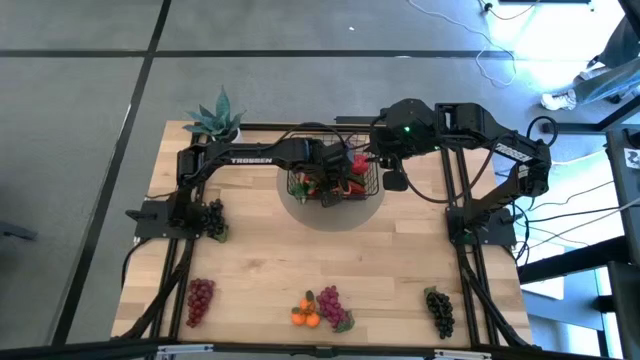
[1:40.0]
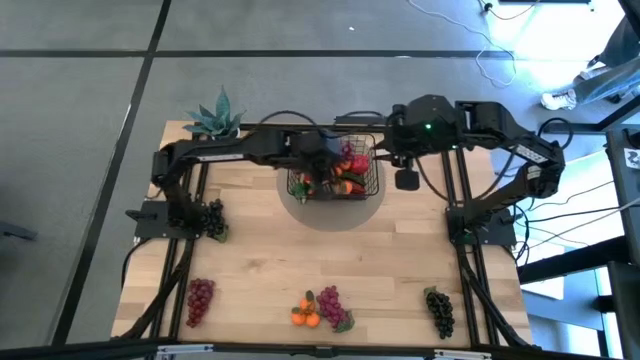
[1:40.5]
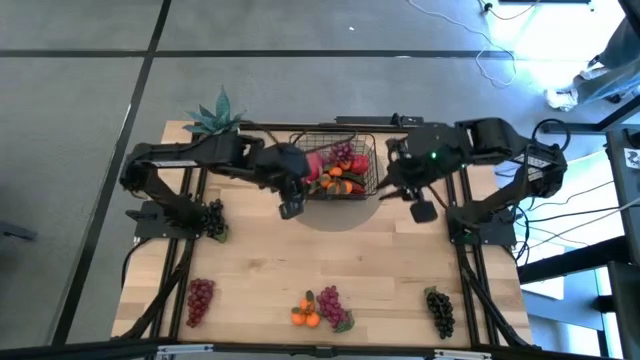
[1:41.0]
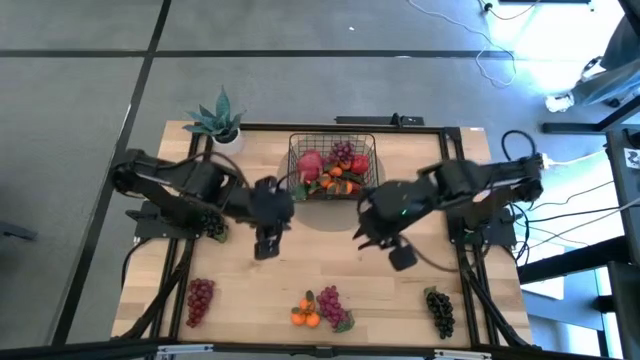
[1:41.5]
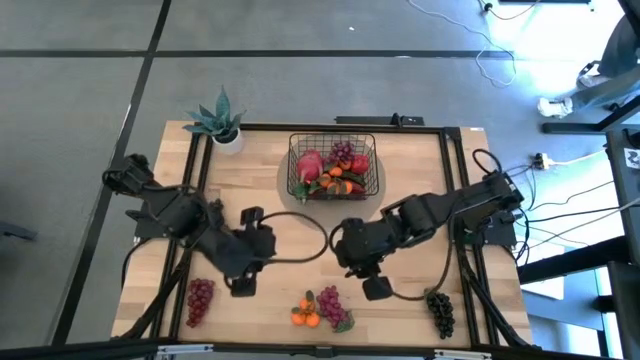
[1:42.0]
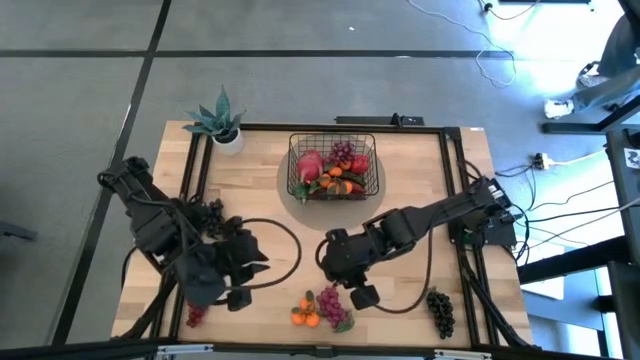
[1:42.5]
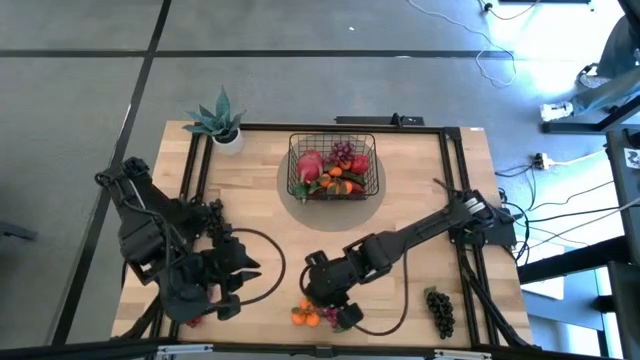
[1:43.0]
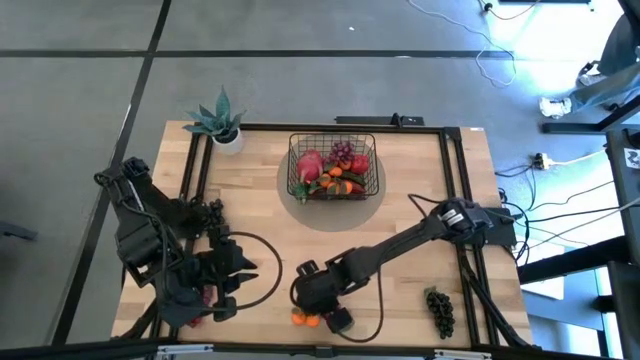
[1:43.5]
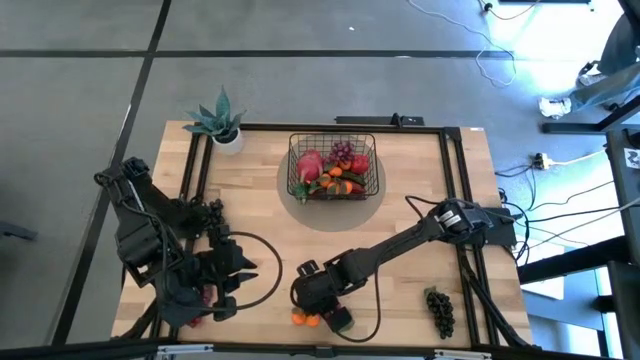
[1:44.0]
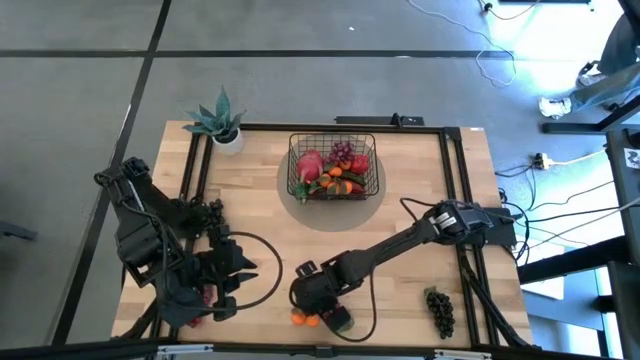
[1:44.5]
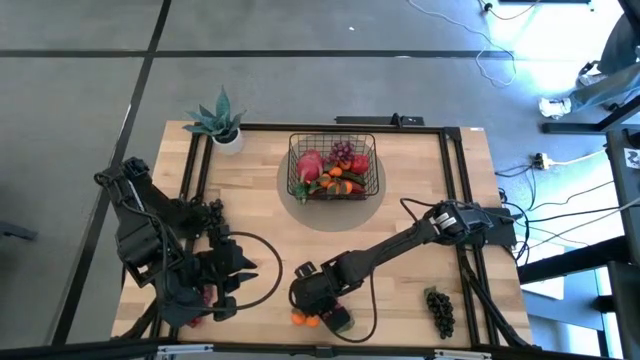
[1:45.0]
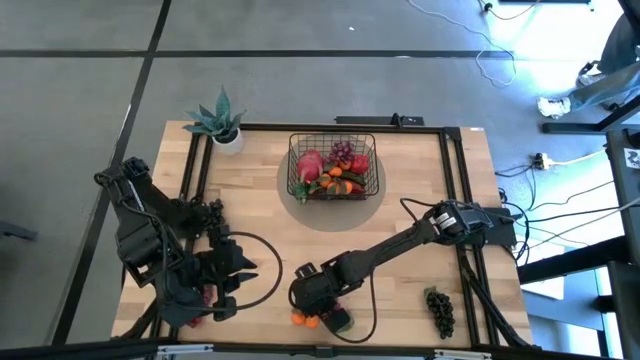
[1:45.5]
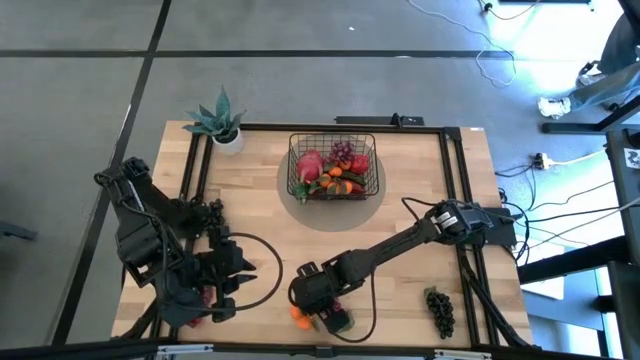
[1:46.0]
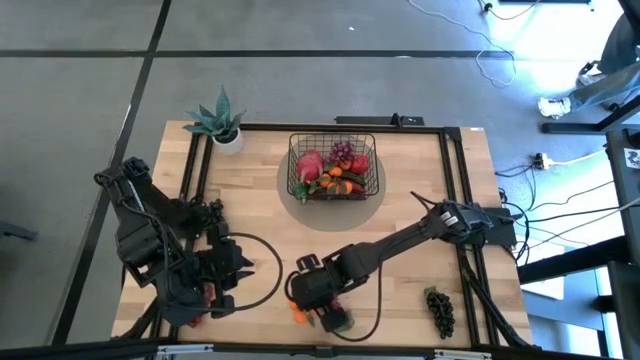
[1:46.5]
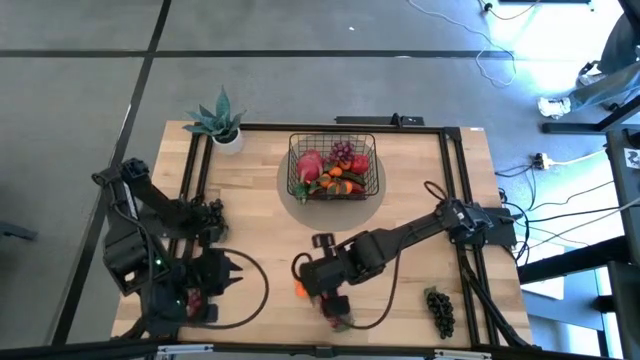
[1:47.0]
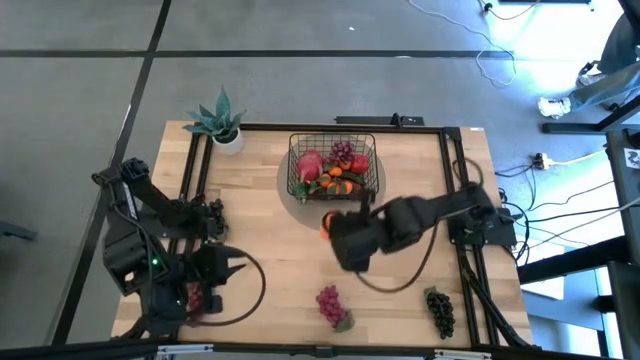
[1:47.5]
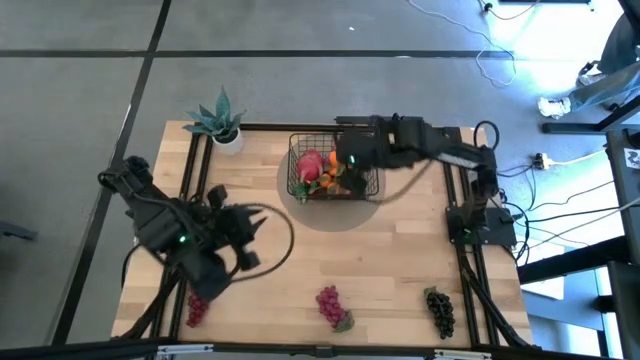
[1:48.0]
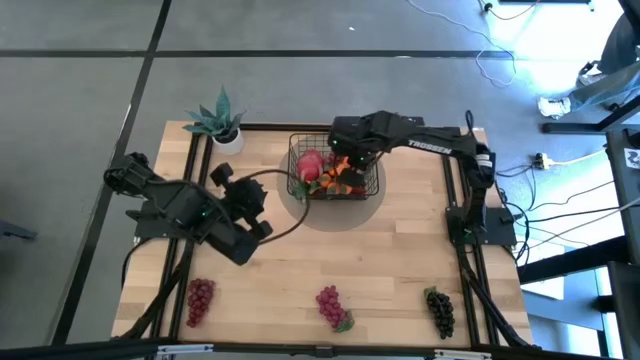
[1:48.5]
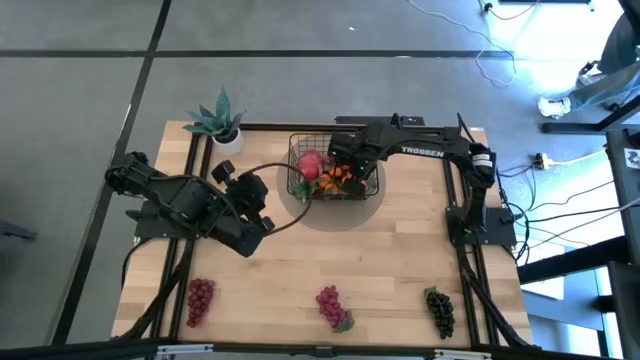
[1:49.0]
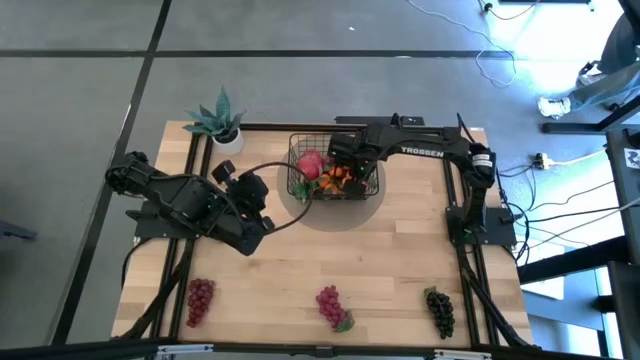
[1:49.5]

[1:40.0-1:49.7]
Task: Build produce basket
Put the tangerine into the black wire basket

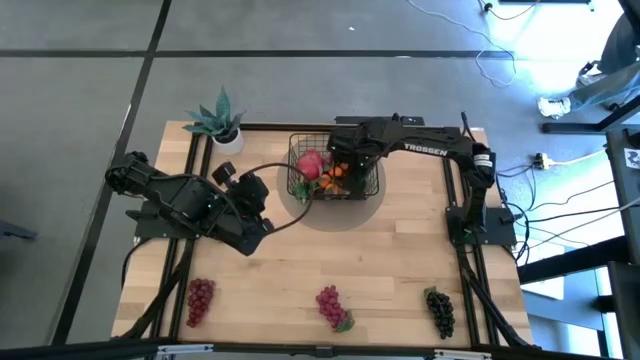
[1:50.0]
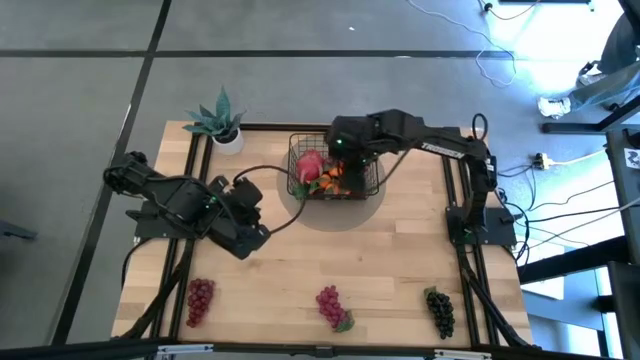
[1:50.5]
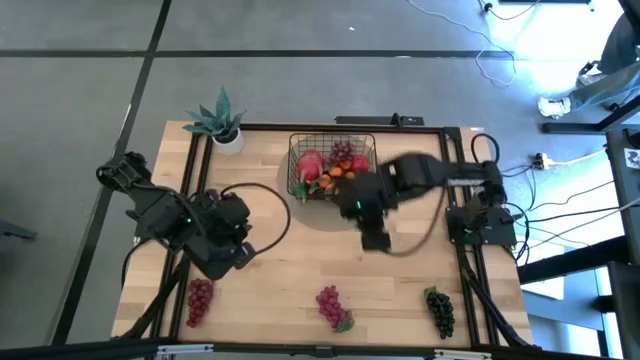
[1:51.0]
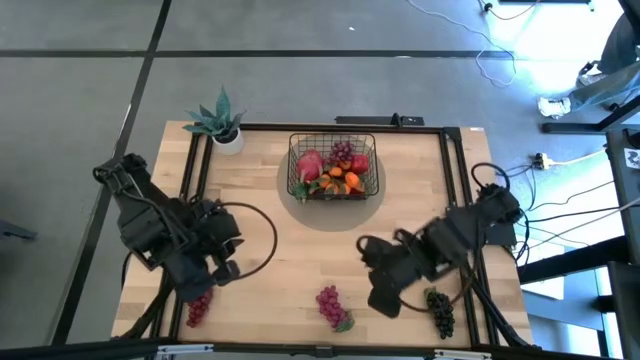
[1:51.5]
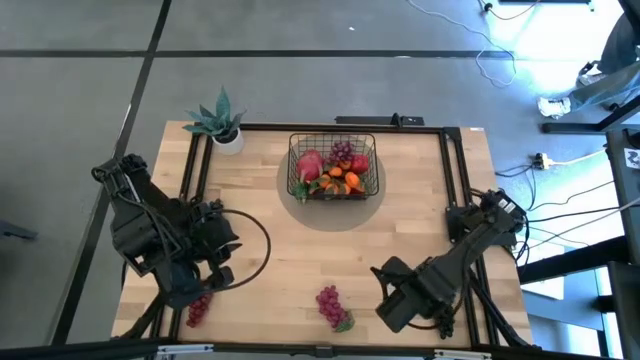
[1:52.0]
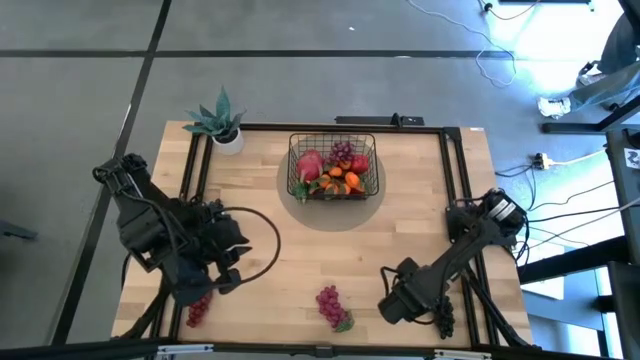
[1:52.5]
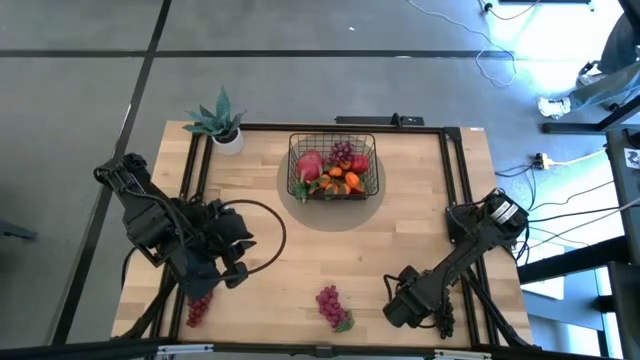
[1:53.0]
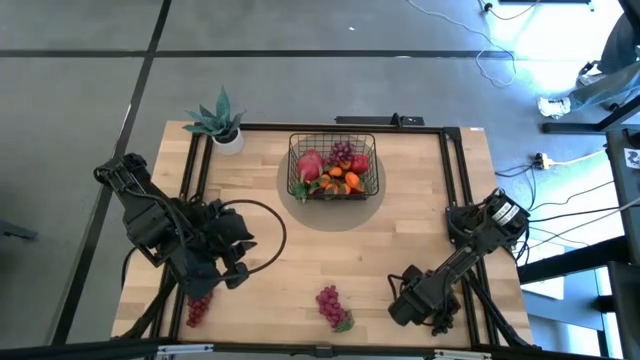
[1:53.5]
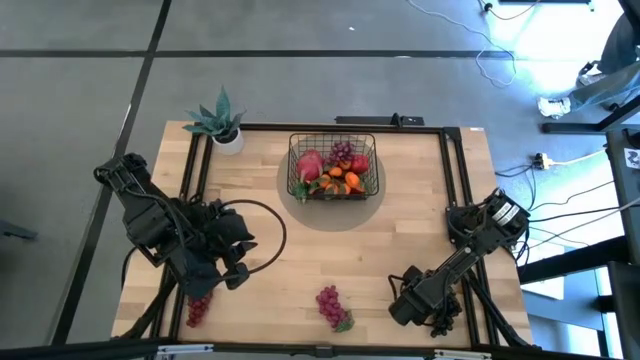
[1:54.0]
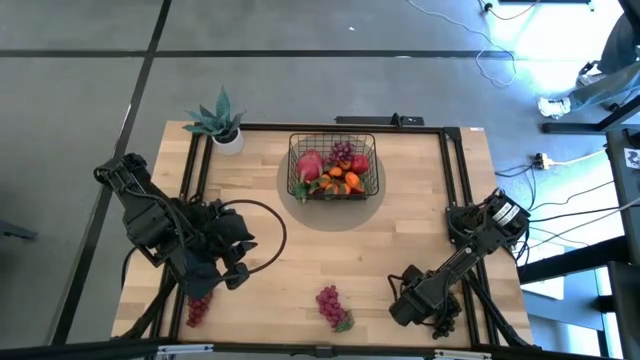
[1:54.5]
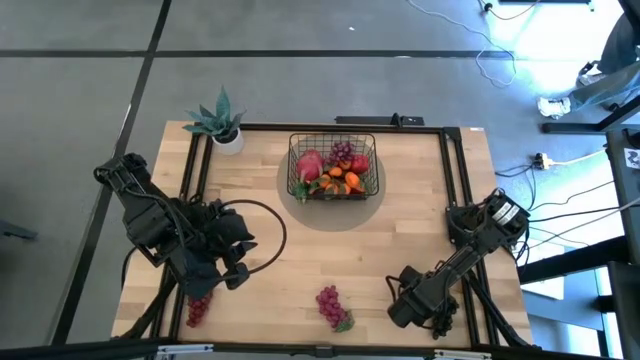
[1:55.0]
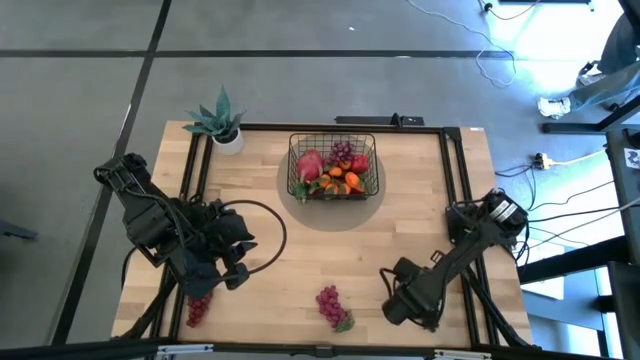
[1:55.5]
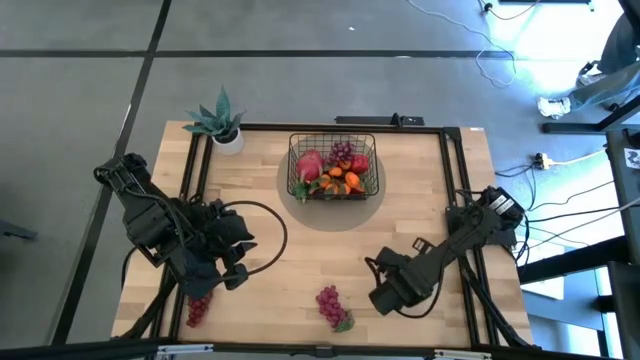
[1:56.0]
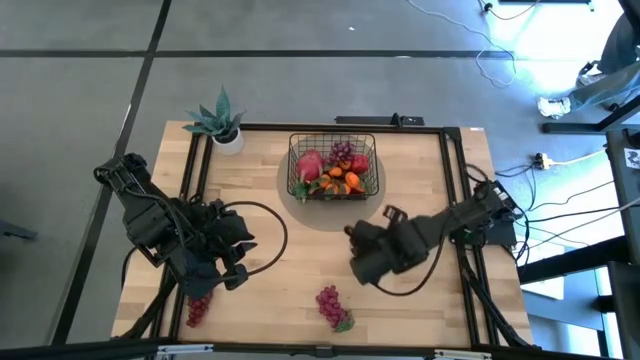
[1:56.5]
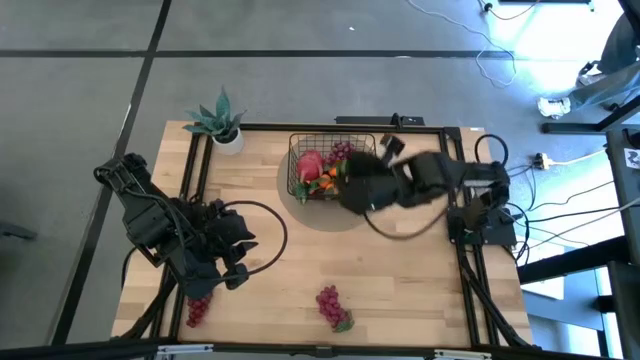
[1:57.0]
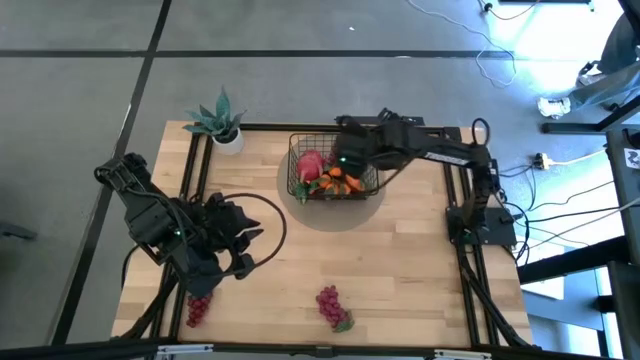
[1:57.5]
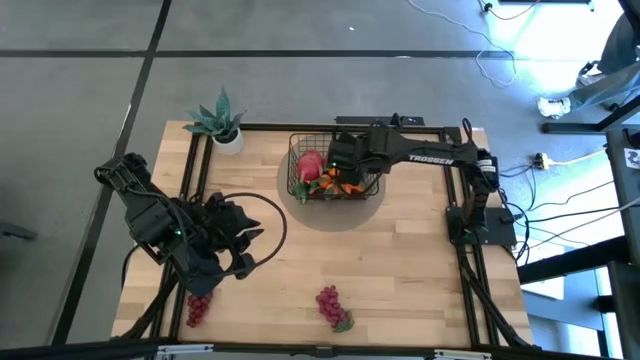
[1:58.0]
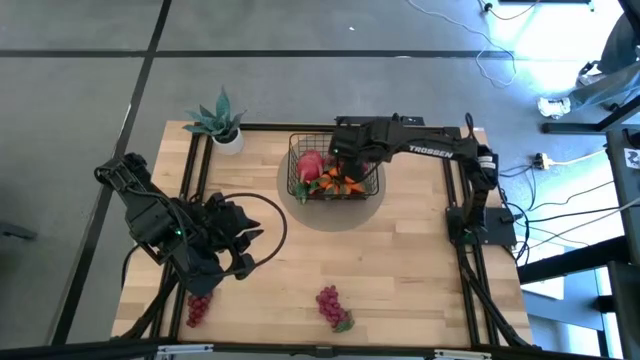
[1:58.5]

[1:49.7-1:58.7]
Put the right black grapes into the black wire basket

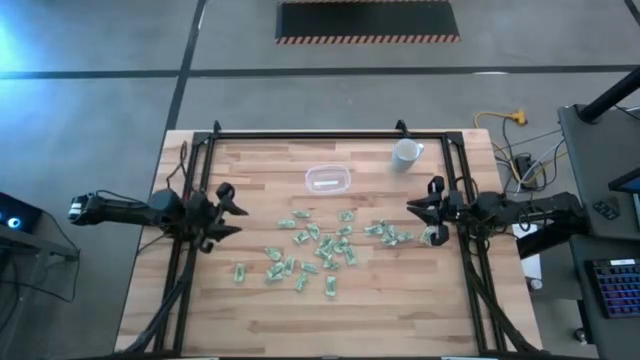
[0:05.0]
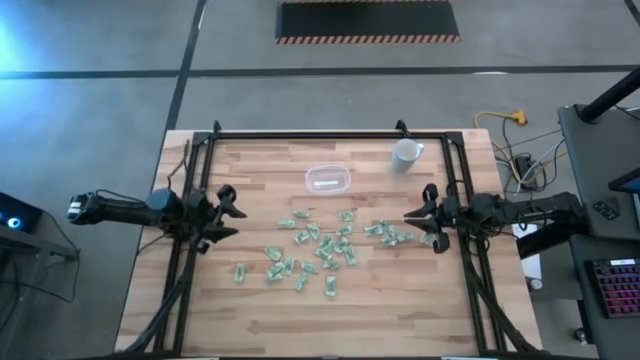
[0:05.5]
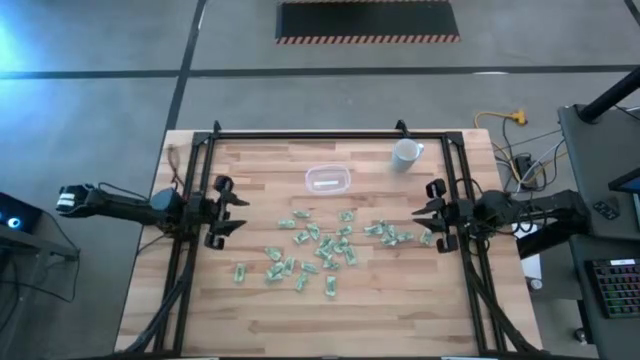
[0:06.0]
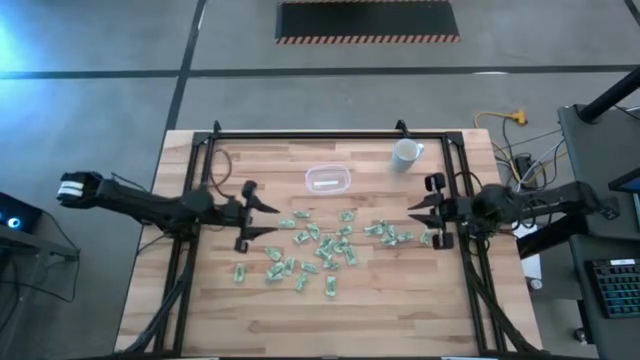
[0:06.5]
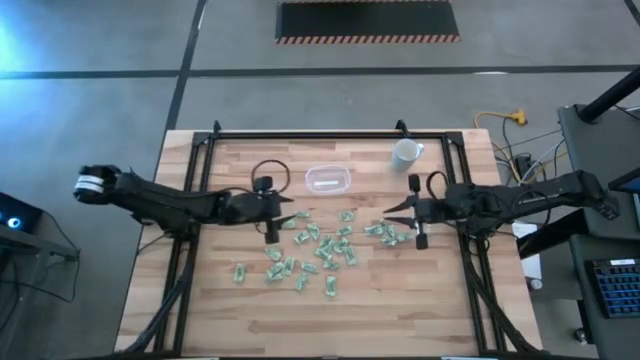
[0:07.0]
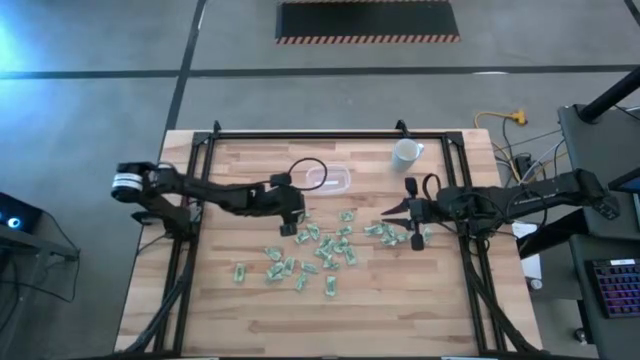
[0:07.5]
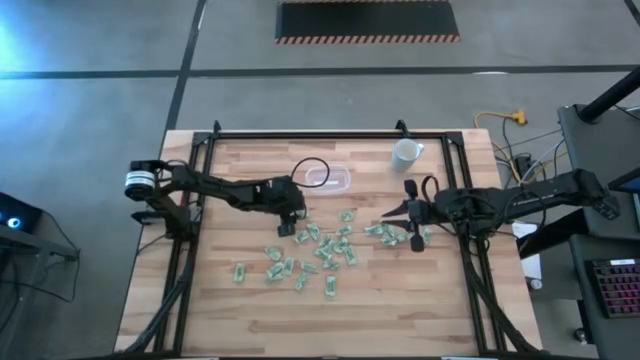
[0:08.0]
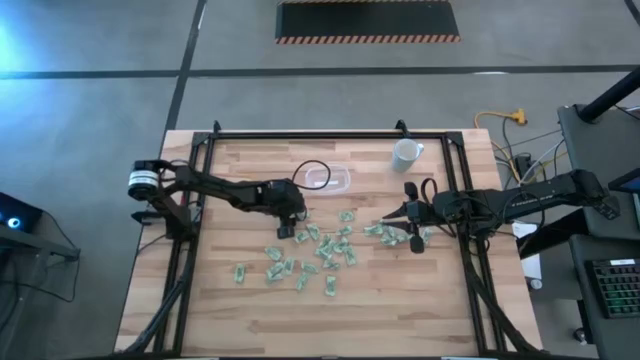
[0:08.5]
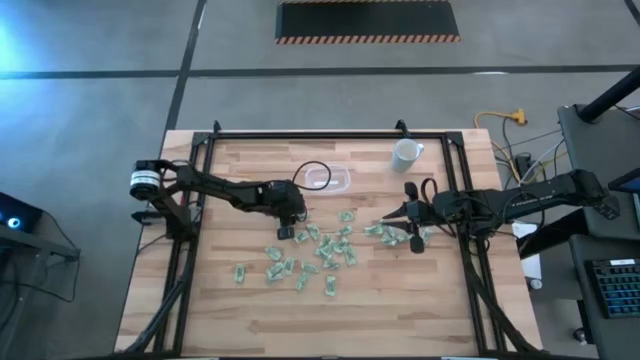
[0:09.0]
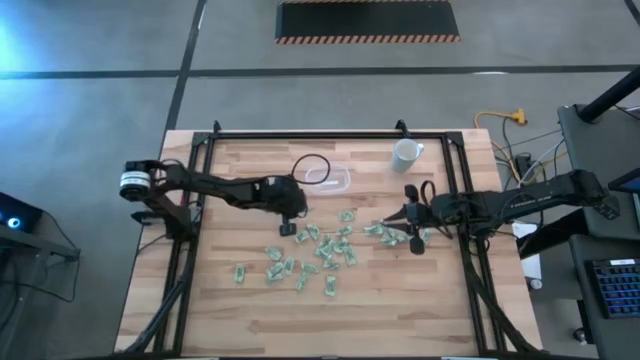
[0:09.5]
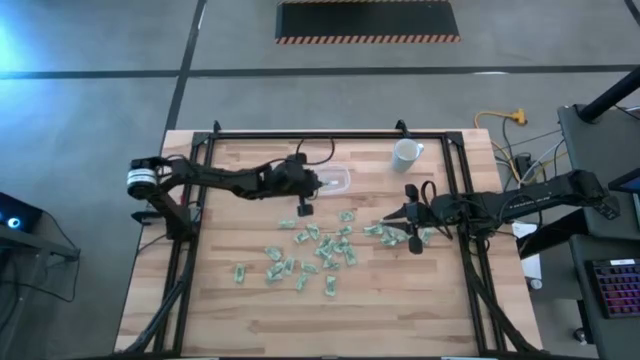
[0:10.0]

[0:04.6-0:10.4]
Task: Pick and place Stevia / Truvia into bins
Put the stevia packet into the transparent container
